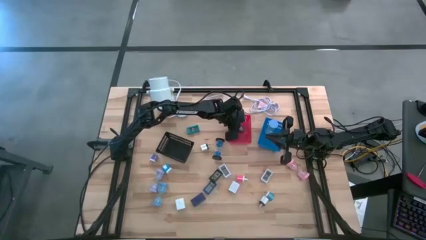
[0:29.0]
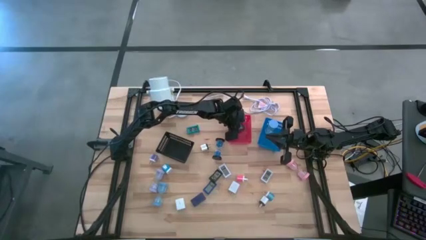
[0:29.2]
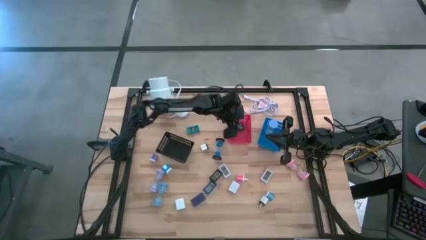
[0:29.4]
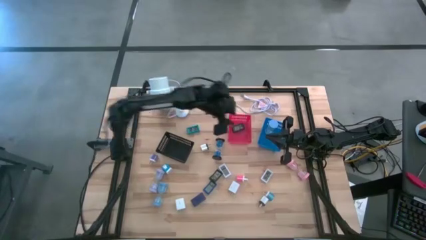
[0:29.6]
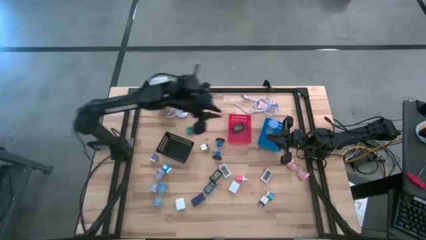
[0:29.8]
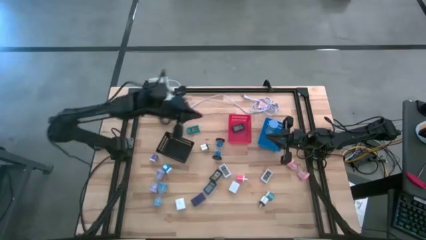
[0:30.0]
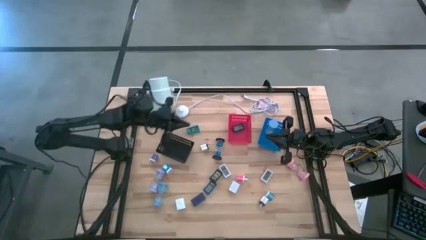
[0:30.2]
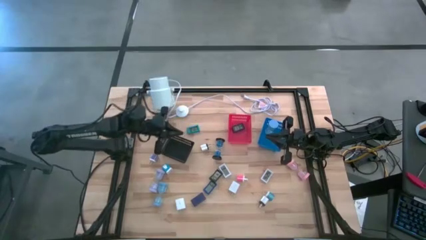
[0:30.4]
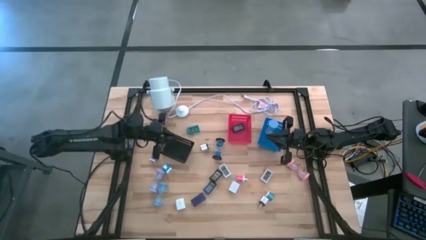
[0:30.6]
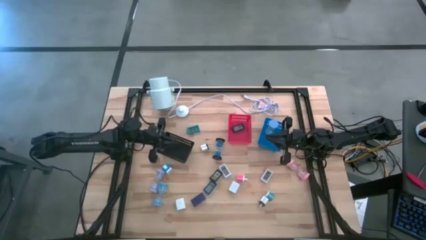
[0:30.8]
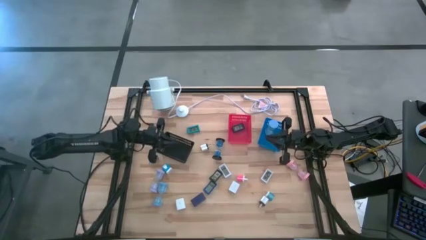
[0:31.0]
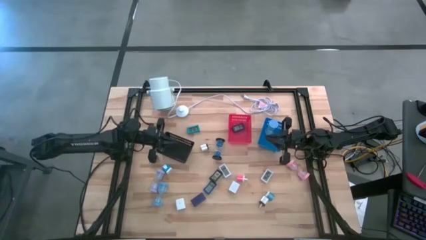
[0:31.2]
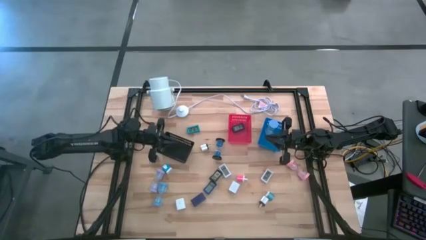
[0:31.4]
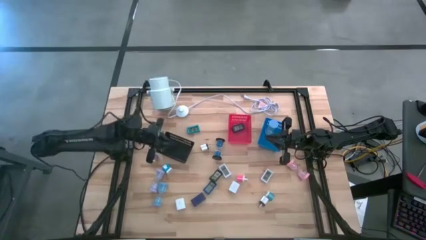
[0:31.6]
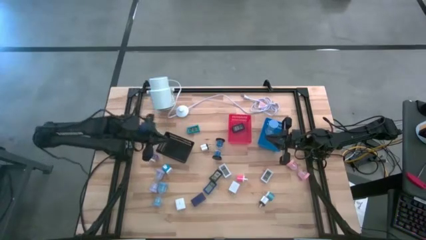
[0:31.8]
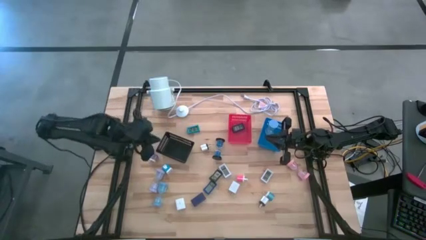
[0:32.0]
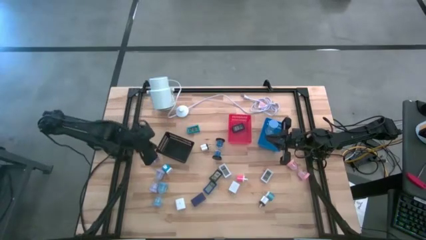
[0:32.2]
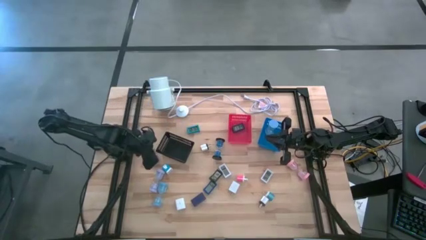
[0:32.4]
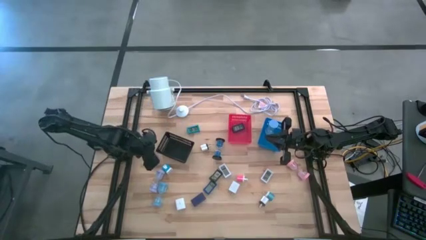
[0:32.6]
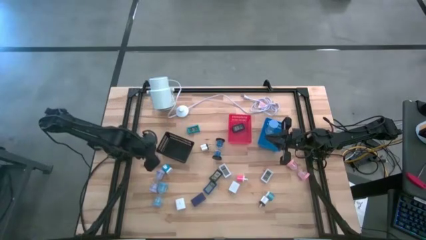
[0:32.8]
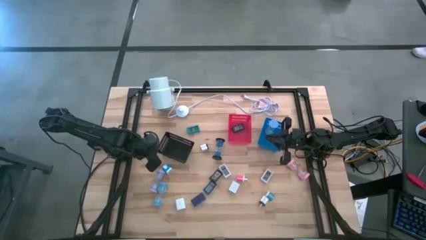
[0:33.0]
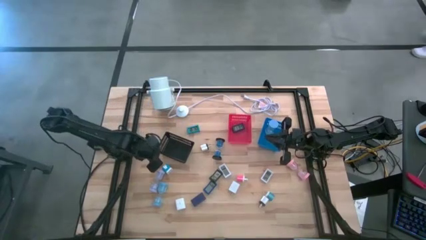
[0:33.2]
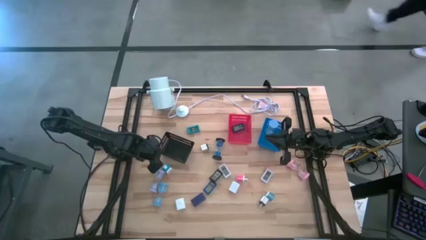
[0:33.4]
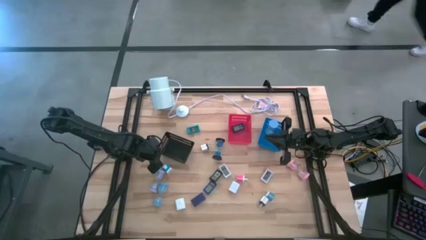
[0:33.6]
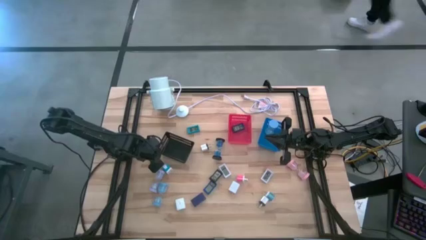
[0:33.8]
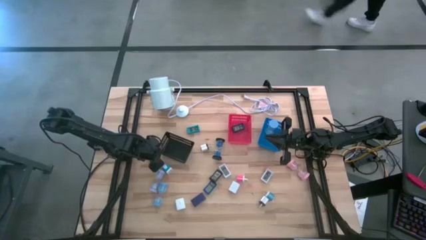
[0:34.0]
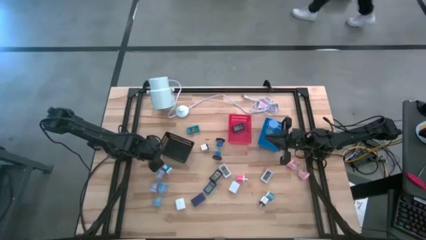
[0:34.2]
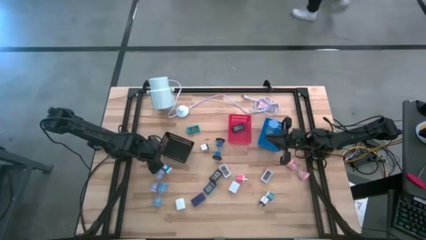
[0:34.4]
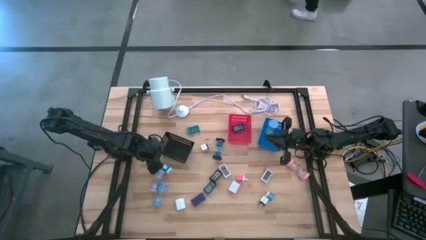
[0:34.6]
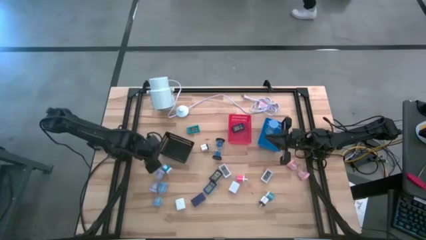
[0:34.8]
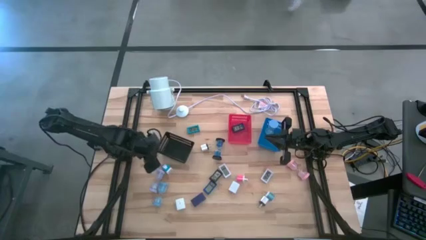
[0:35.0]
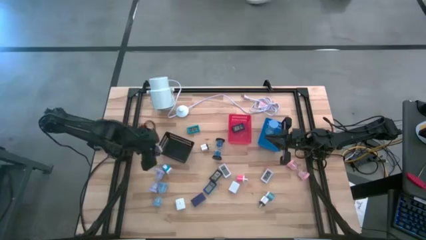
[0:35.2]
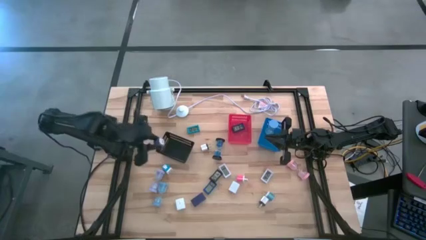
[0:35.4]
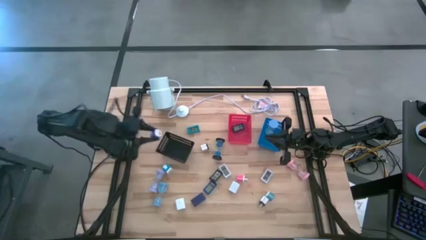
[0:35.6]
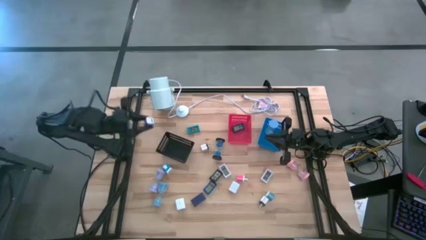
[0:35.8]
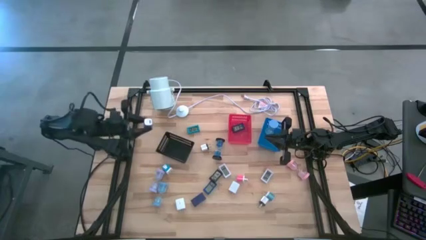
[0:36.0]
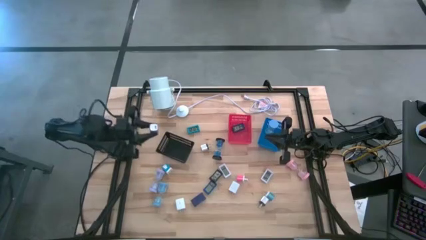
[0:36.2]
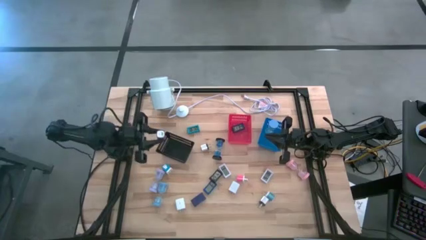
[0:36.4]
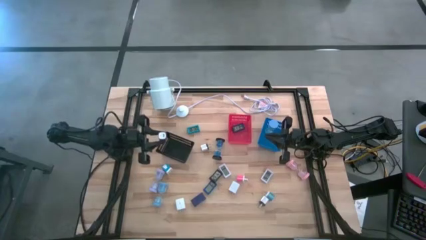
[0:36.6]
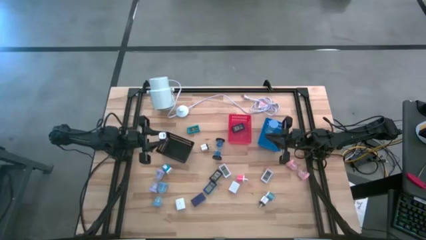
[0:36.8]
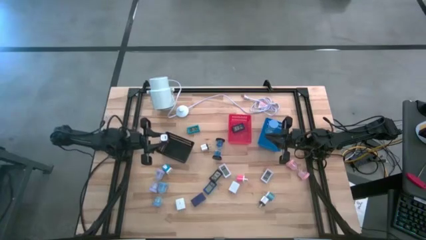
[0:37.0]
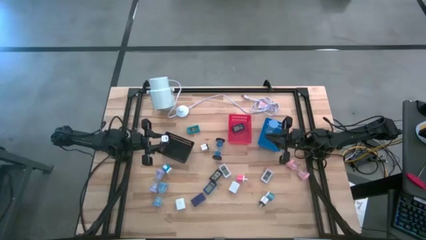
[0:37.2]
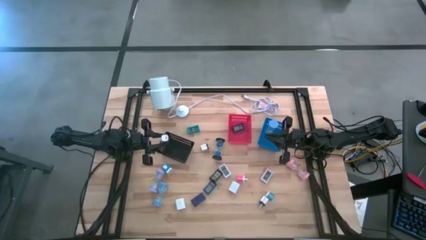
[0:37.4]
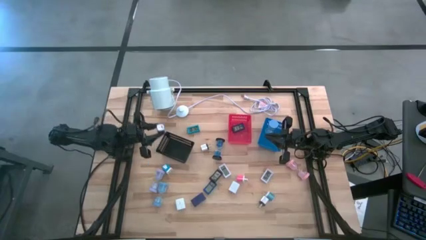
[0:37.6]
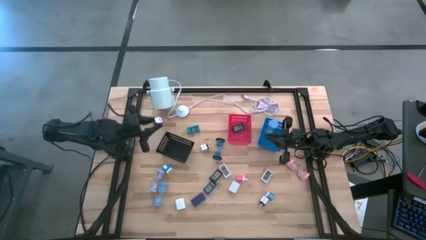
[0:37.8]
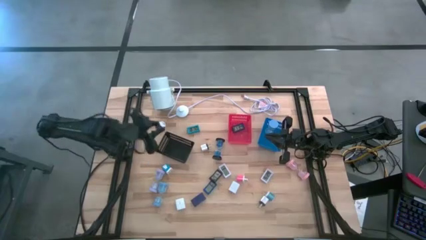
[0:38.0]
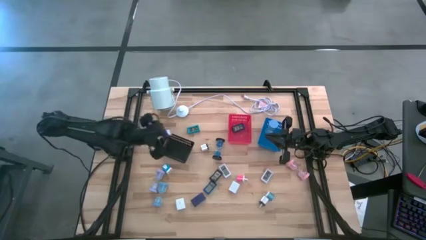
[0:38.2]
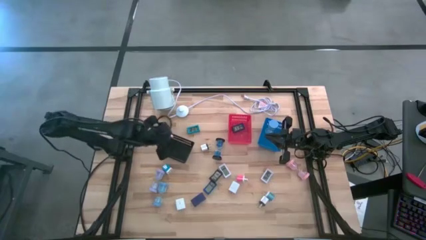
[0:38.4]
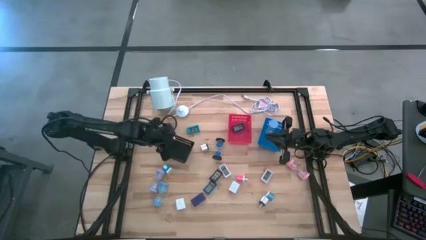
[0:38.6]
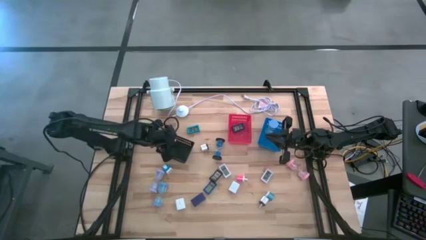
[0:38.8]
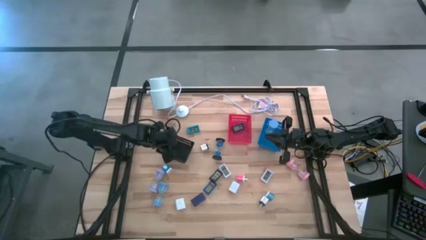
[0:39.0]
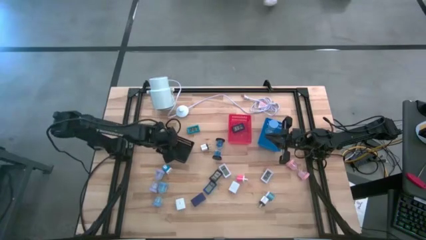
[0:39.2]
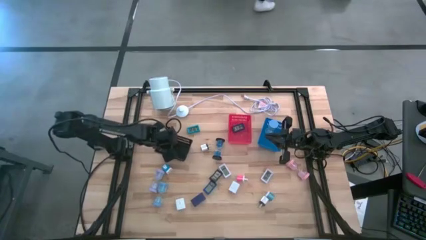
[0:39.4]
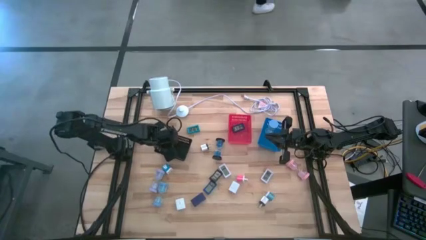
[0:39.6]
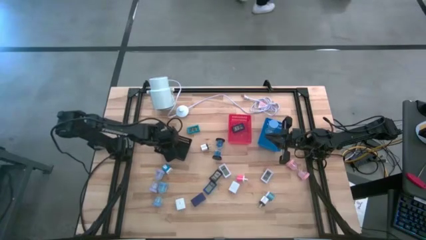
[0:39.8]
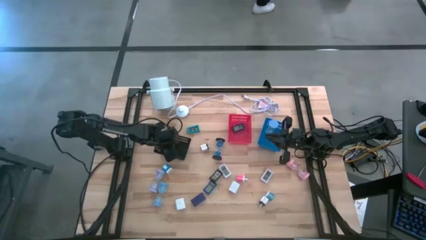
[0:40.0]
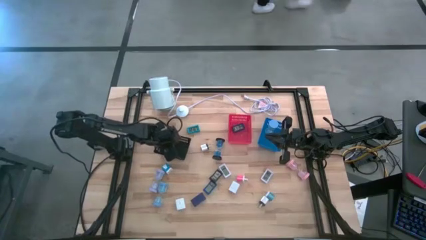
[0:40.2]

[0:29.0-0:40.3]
Task: Pick & Place Office items
Put the violet charger adaptor into the black bin

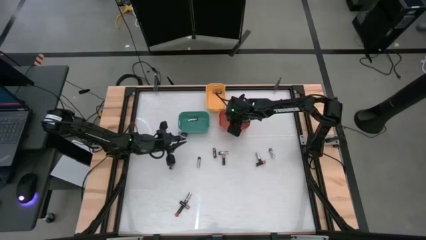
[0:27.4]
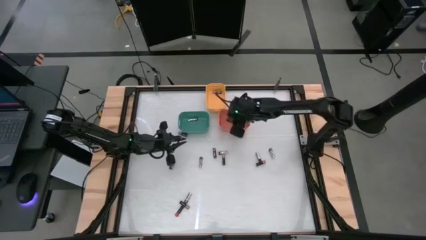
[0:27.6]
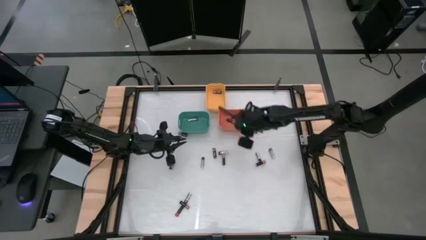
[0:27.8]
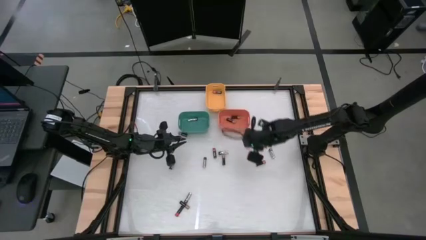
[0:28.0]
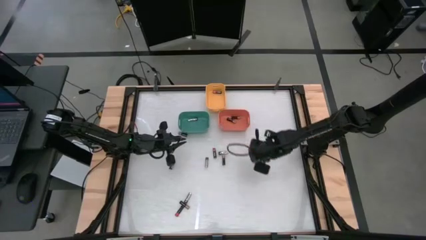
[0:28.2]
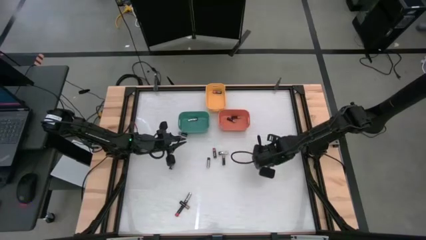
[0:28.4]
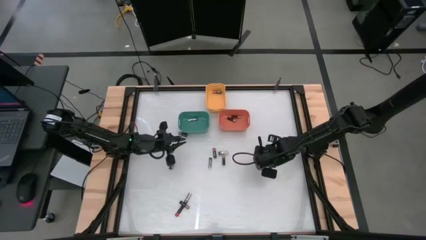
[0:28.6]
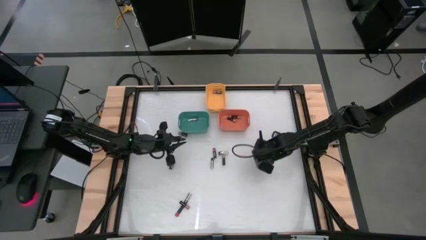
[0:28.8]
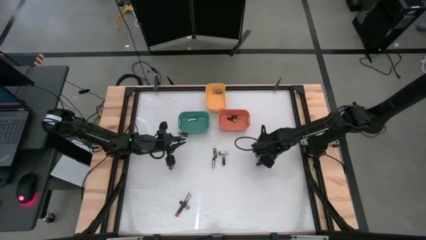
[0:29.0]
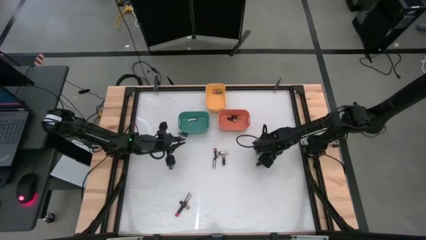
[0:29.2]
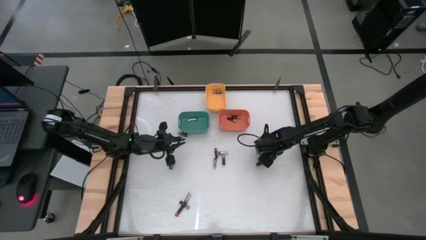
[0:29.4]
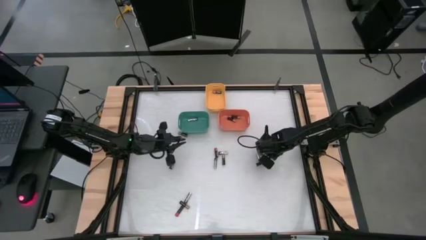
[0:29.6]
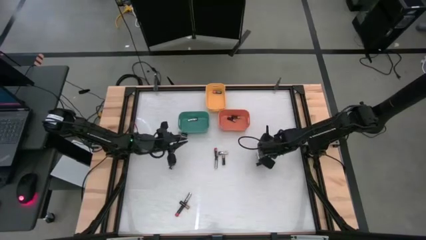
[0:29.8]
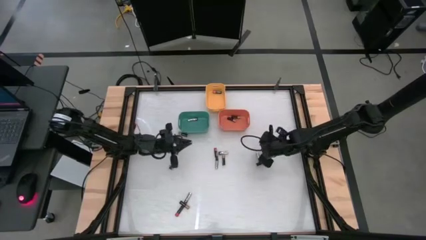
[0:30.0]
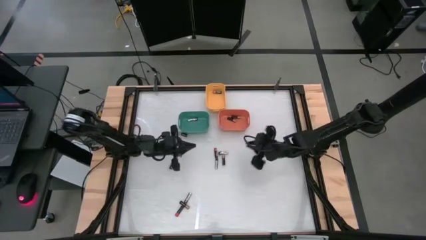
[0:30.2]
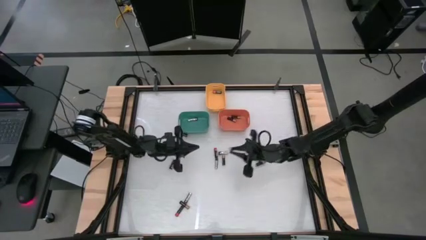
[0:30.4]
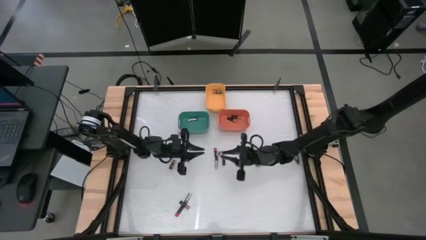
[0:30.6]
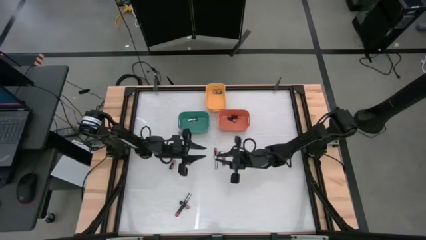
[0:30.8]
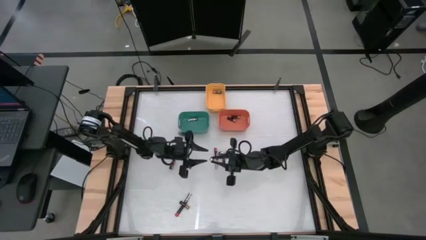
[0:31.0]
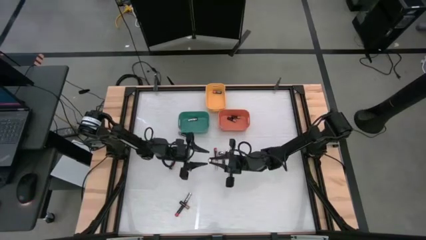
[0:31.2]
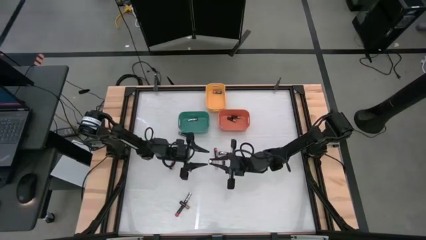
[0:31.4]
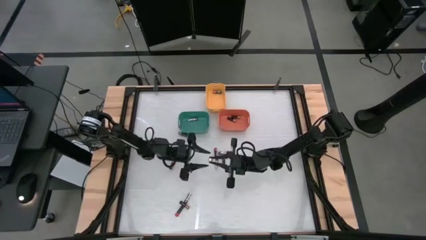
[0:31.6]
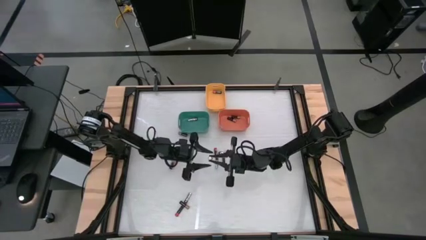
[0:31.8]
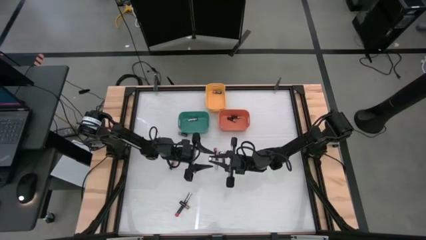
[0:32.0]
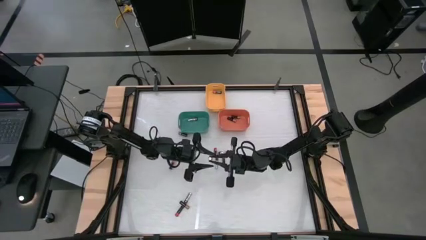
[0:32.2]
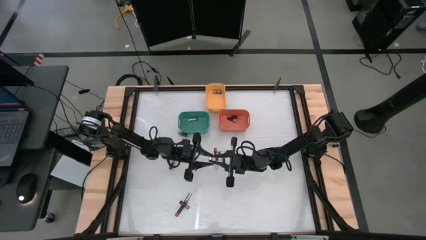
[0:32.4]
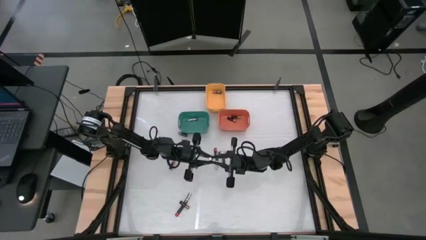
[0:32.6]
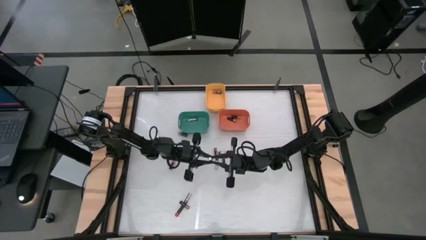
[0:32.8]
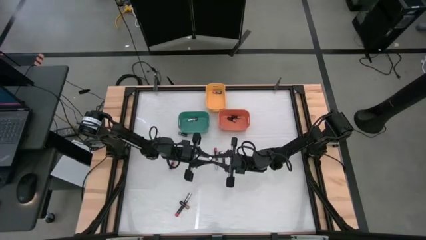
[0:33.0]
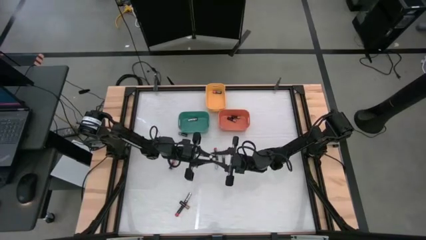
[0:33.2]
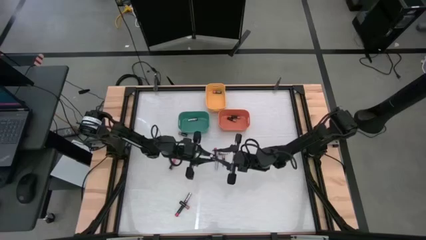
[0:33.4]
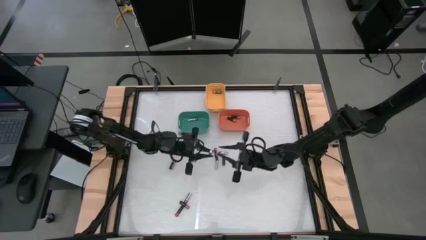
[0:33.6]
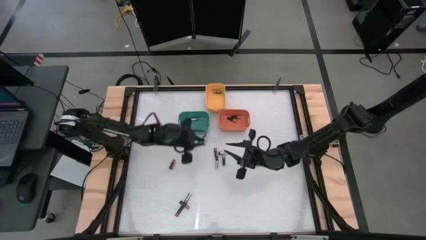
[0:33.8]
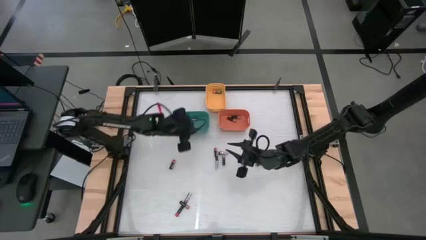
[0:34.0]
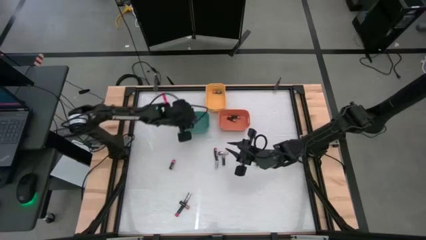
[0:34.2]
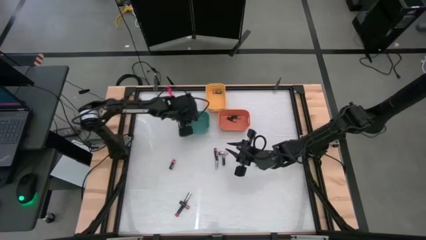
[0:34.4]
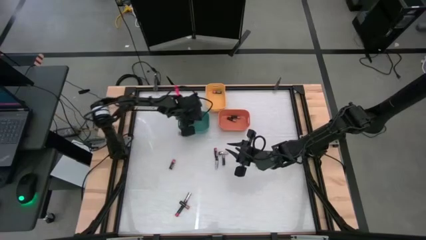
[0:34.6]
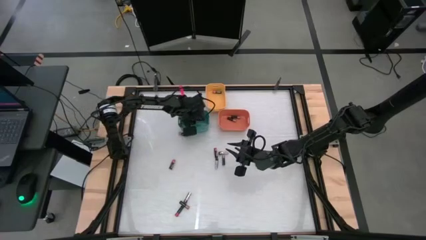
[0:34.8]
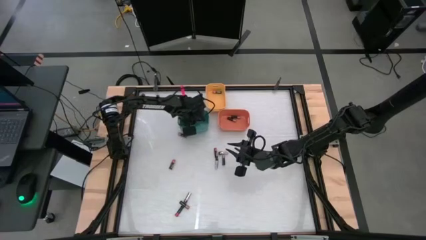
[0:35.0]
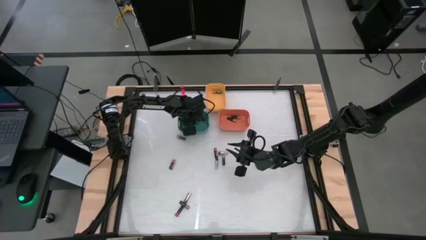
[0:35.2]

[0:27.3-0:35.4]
Task: Sort batteries
Put the silver battery into the green bin
